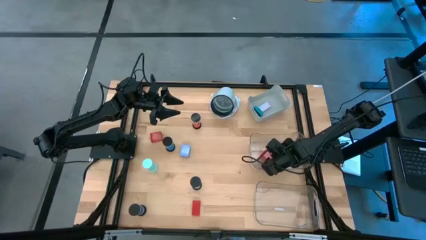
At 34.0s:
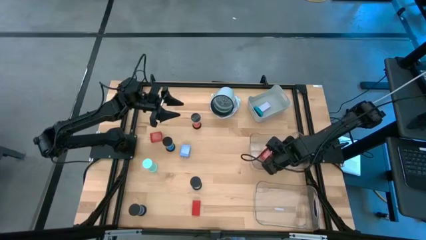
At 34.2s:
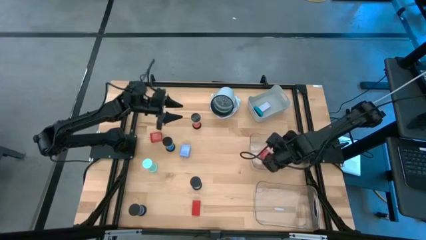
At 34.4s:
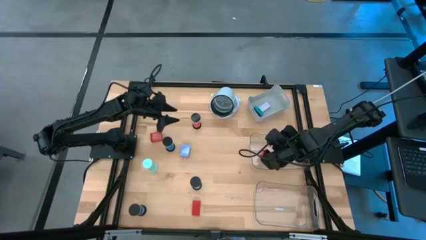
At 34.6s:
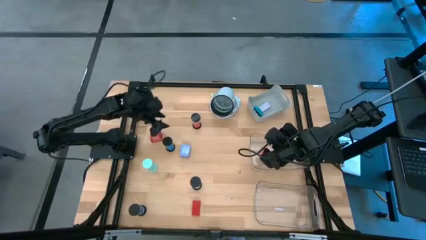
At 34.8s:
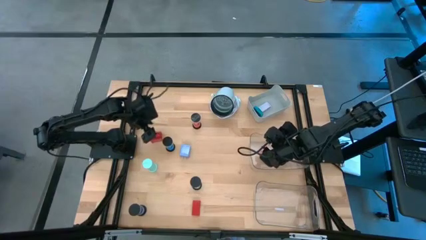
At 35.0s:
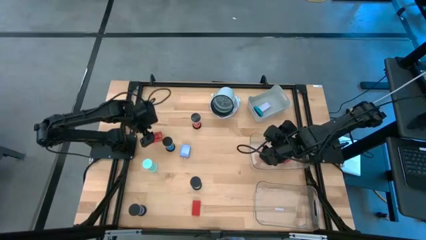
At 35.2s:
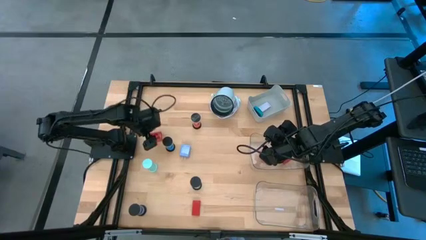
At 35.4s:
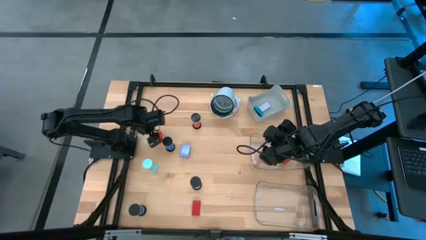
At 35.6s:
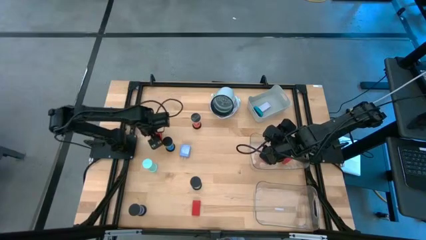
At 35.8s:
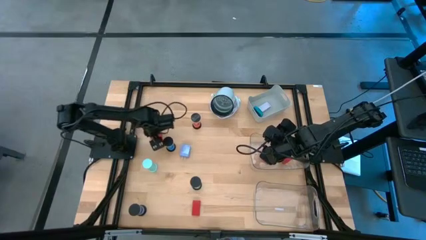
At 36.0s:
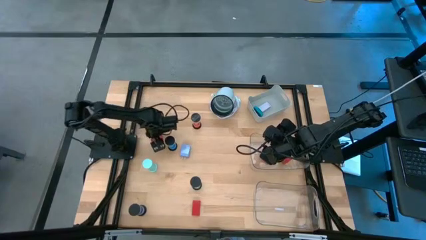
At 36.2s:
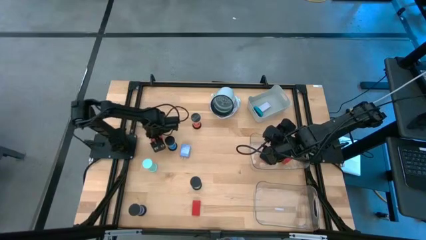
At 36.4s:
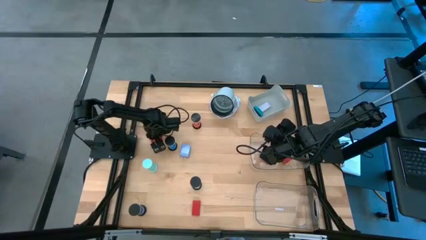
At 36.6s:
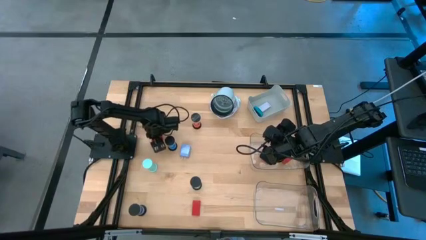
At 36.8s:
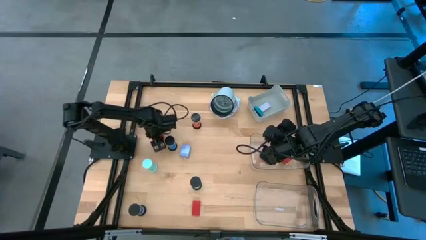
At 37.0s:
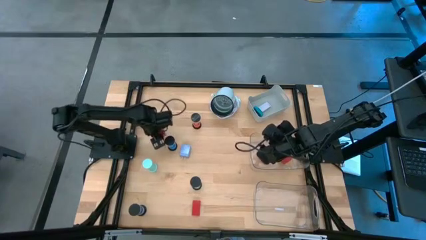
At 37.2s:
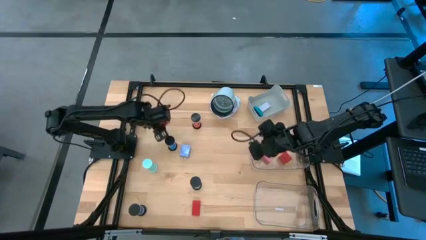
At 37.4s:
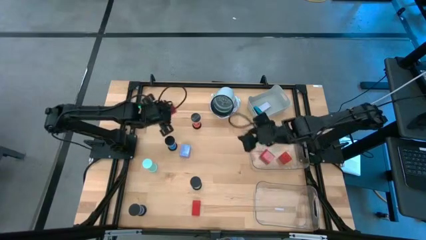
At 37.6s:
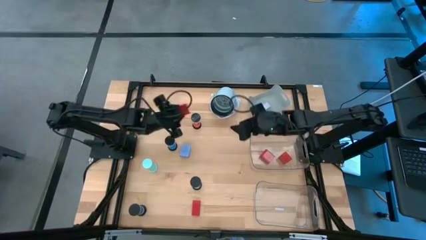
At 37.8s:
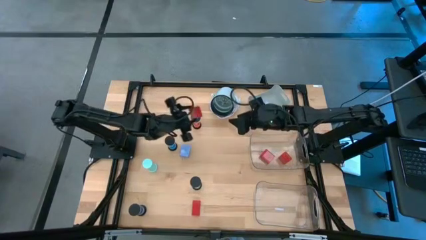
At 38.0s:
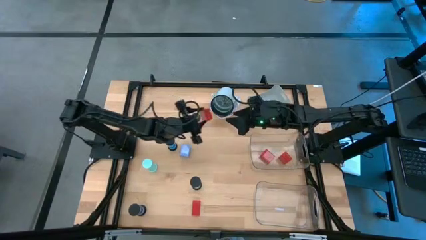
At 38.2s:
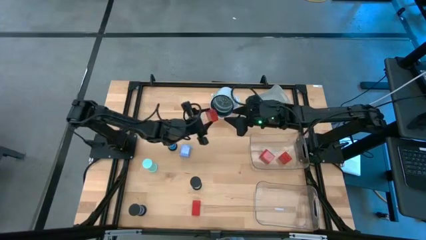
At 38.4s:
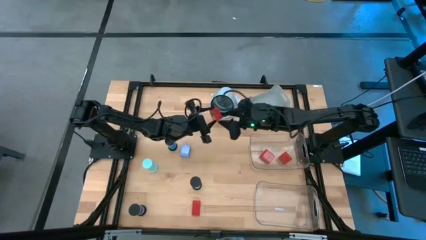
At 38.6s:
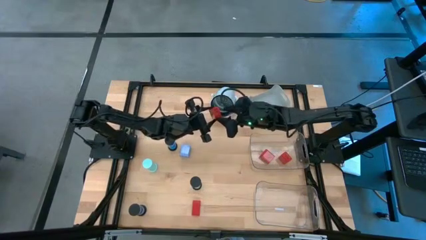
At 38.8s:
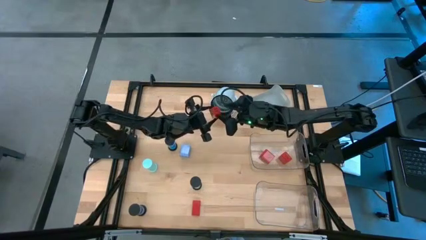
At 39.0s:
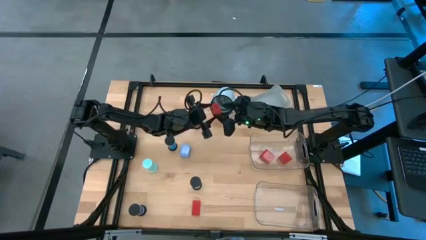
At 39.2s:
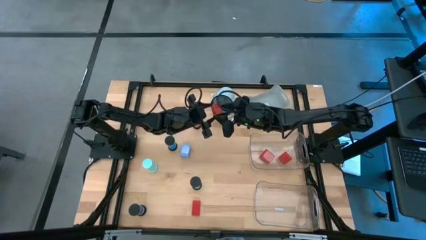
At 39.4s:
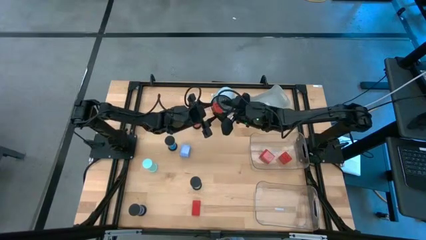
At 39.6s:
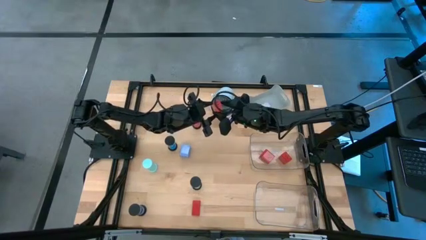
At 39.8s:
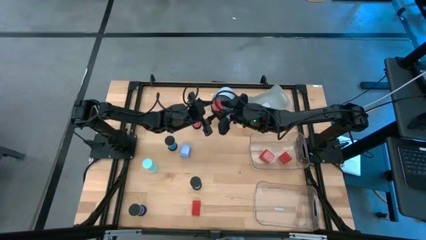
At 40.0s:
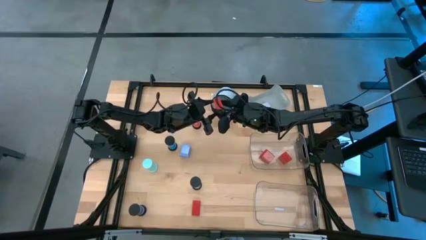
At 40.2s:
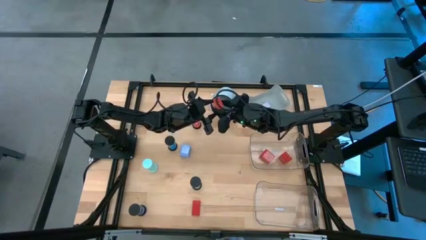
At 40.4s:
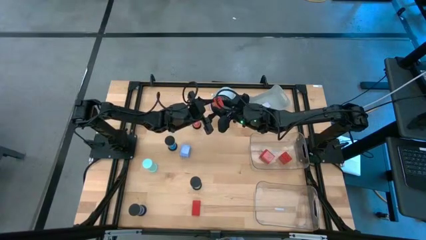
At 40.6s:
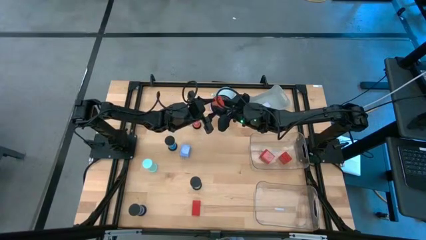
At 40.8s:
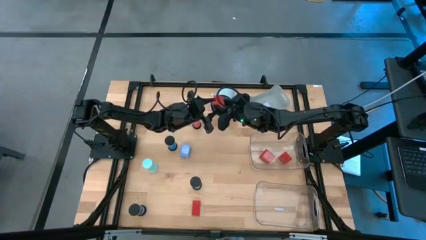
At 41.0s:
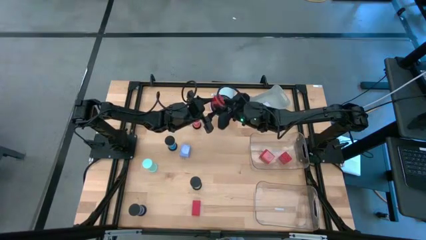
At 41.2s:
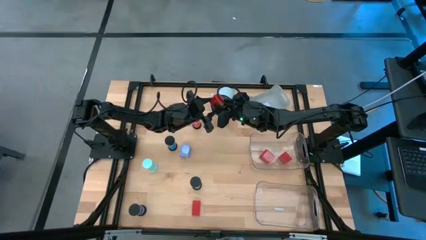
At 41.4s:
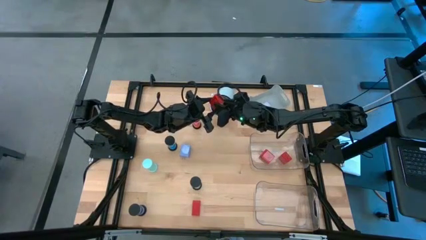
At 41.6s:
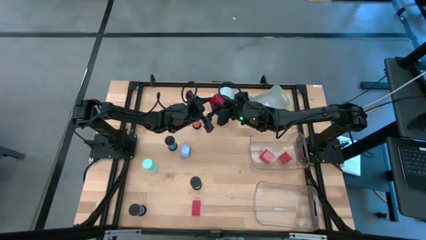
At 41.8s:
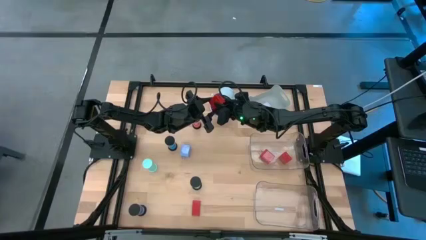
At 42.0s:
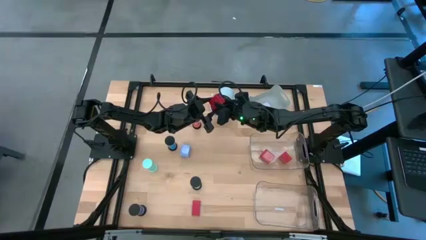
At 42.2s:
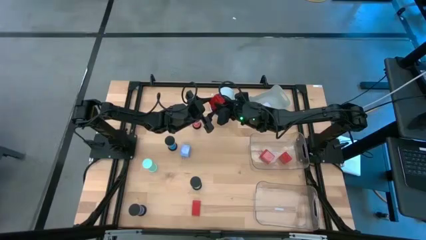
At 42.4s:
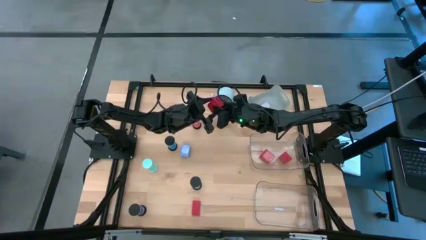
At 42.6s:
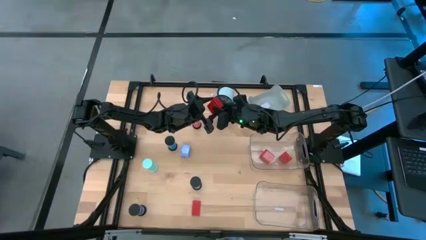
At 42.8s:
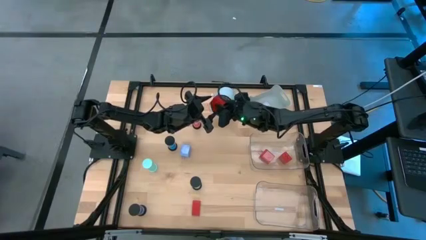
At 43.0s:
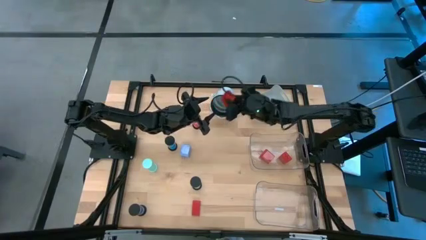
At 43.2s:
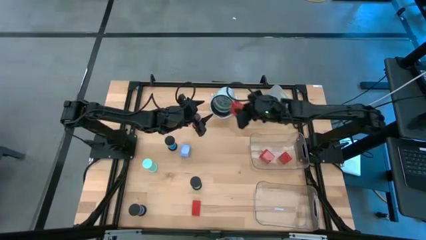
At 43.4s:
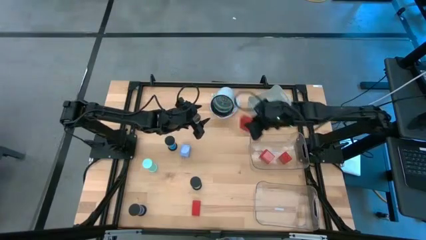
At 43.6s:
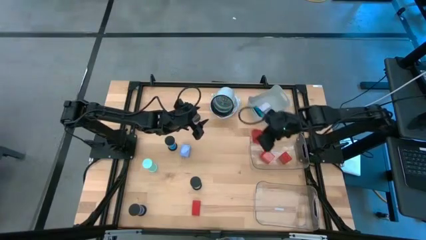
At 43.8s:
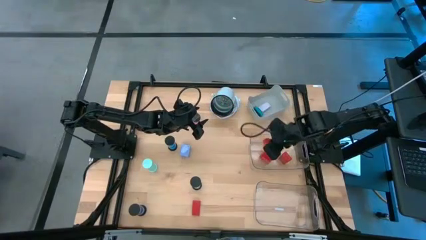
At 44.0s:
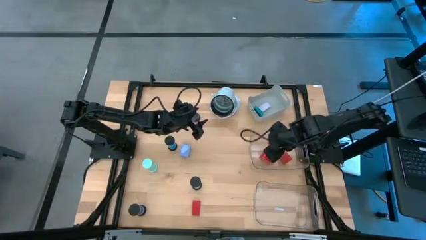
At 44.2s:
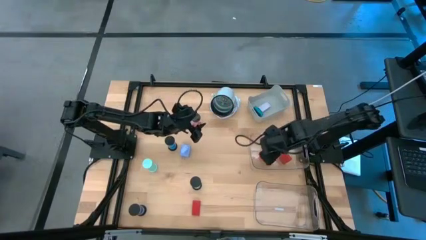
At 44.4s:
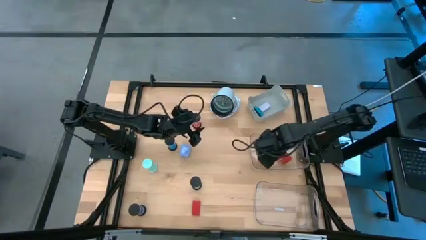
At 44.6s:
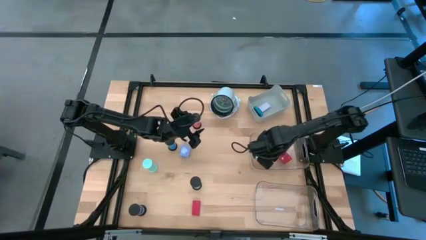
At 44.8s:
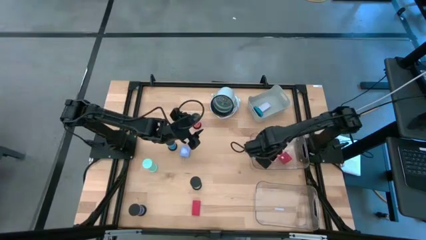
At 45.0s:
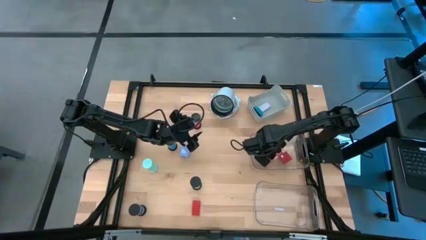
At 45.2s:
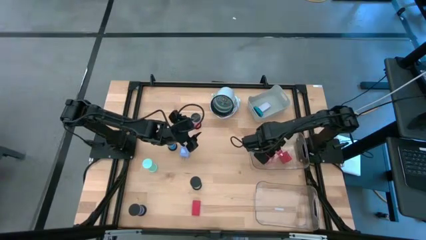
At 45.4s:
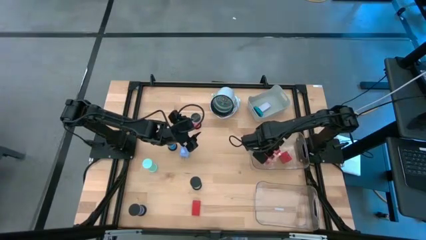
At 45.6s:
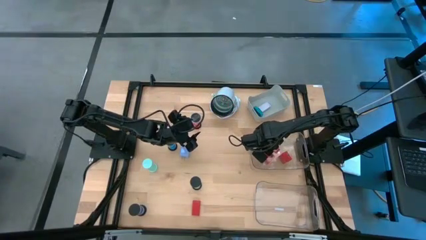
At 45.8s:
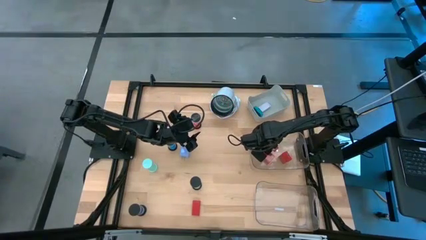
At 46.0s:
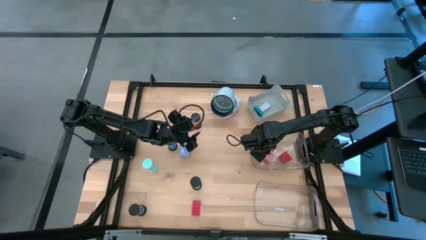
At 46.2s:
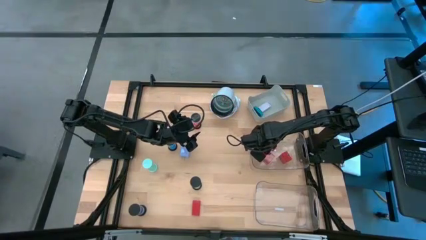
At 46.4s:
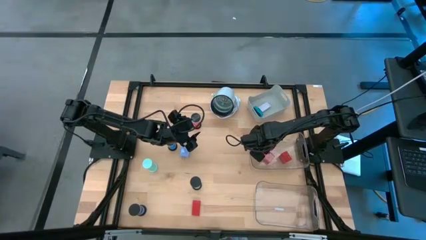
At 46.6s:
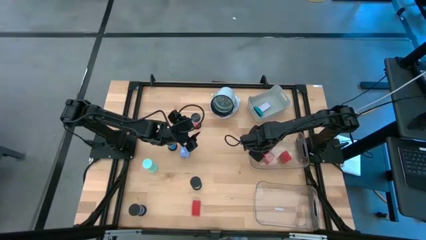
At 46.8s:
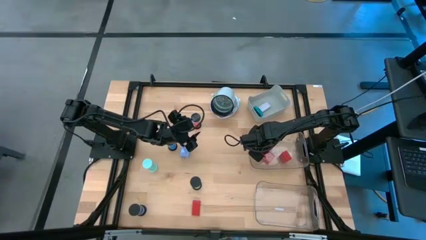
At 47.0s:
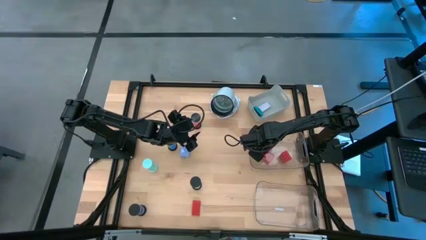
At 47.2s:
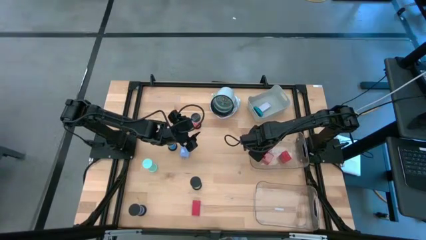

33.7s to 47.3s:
Task: Pick & Place Office items
Put the red charger adapter into the top transparent bin
